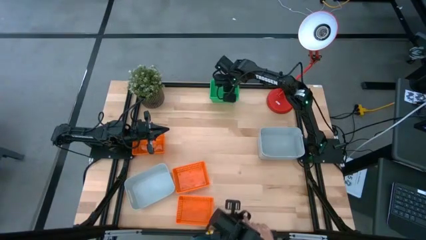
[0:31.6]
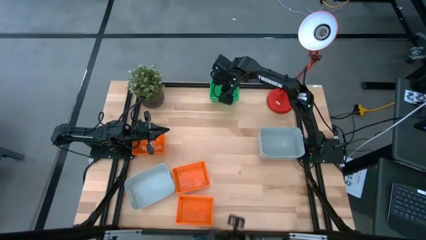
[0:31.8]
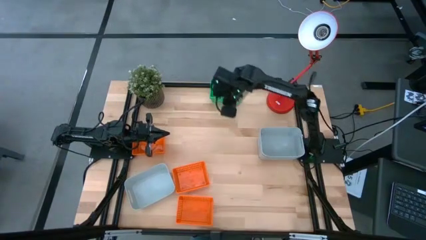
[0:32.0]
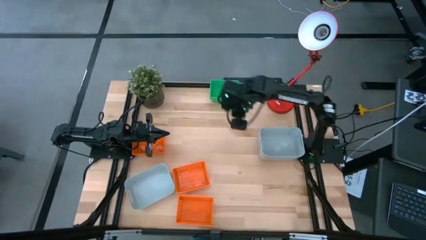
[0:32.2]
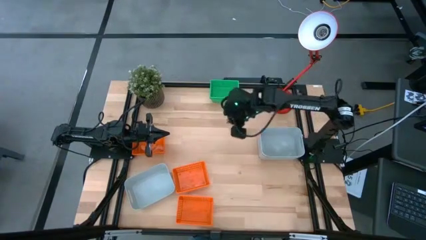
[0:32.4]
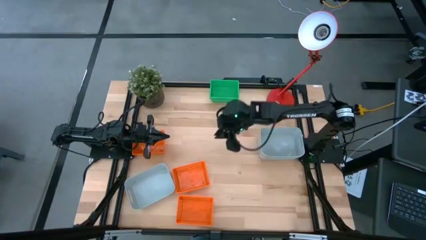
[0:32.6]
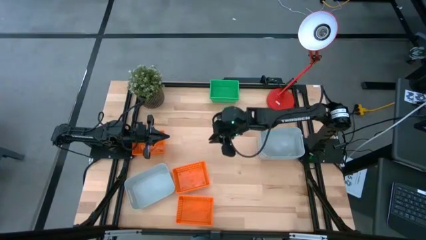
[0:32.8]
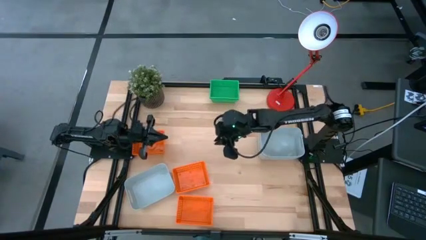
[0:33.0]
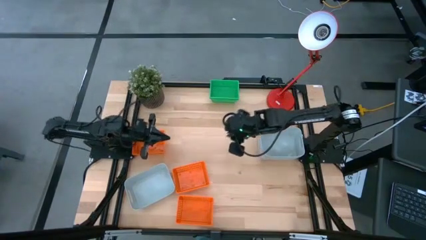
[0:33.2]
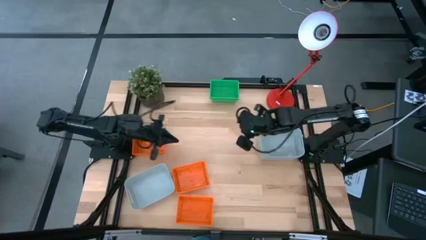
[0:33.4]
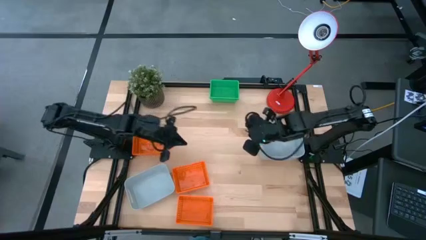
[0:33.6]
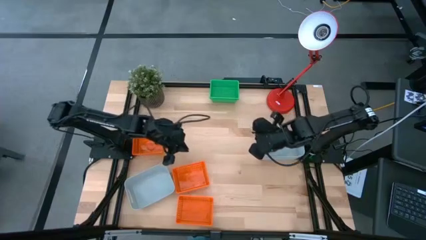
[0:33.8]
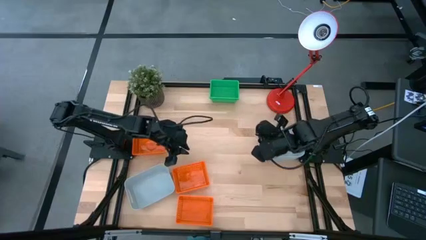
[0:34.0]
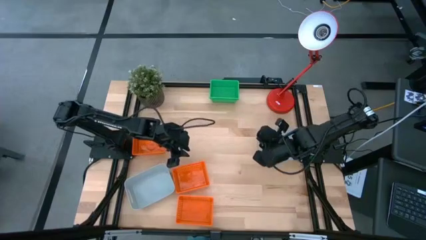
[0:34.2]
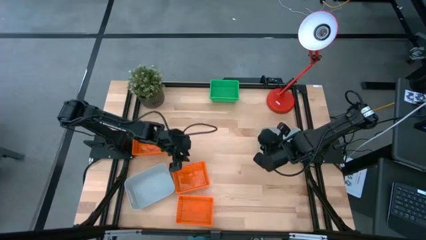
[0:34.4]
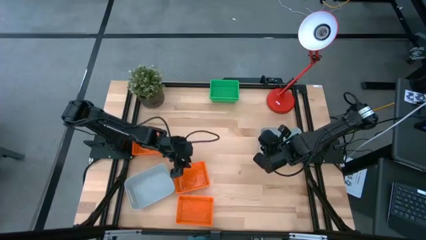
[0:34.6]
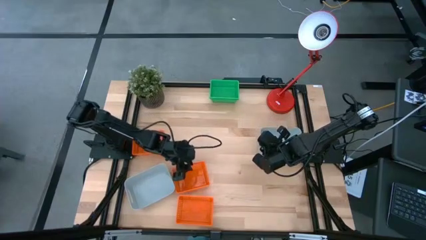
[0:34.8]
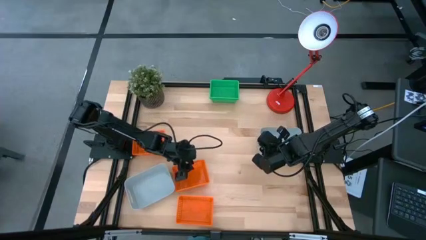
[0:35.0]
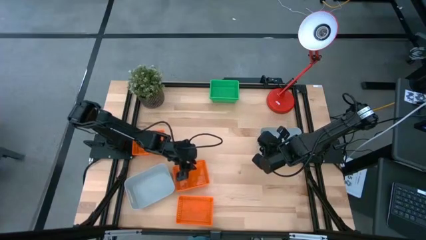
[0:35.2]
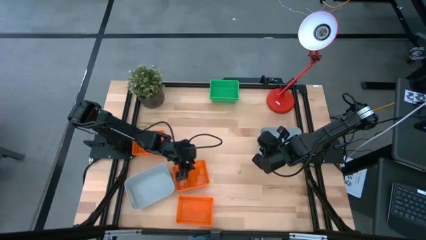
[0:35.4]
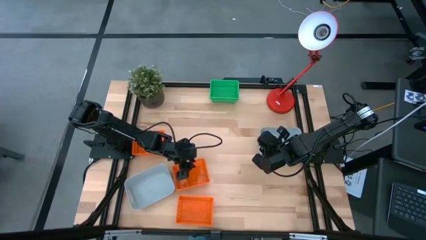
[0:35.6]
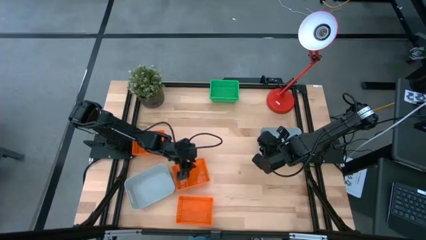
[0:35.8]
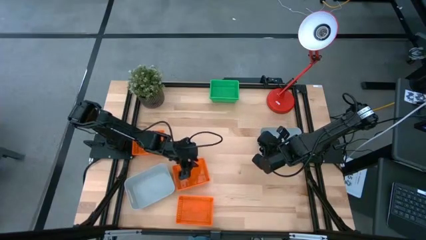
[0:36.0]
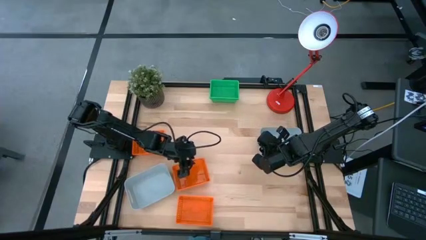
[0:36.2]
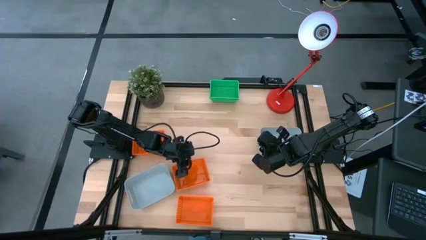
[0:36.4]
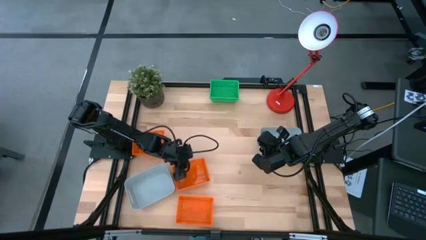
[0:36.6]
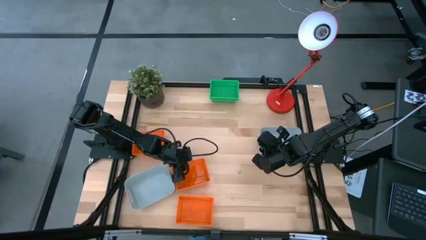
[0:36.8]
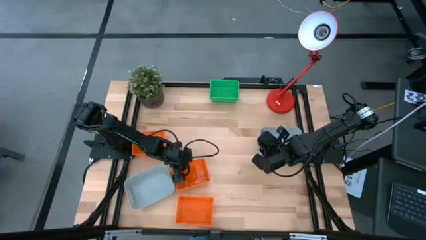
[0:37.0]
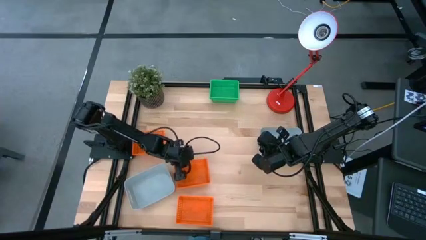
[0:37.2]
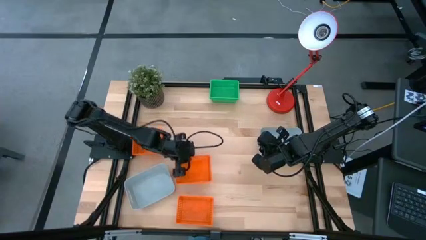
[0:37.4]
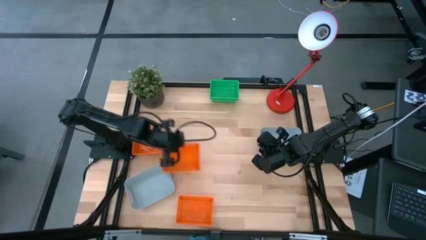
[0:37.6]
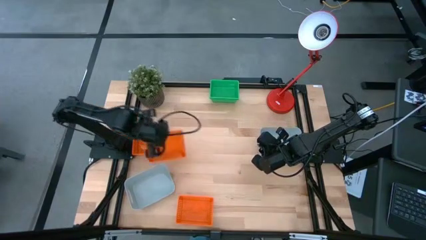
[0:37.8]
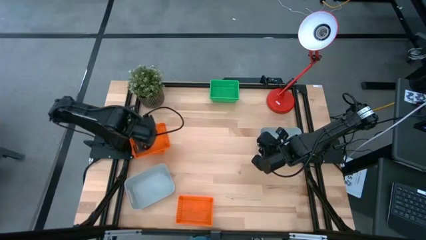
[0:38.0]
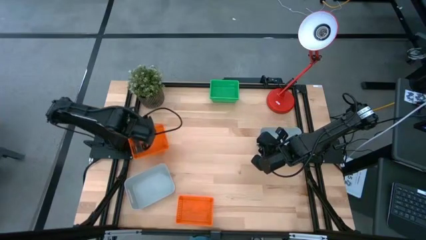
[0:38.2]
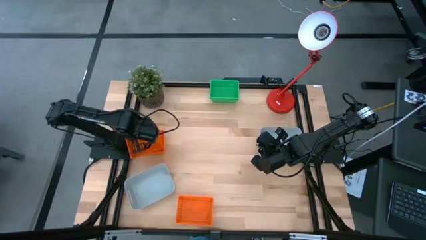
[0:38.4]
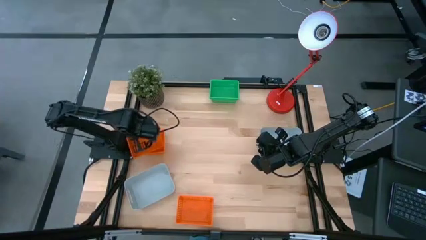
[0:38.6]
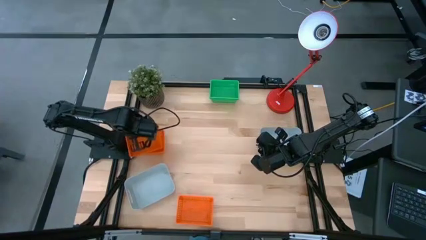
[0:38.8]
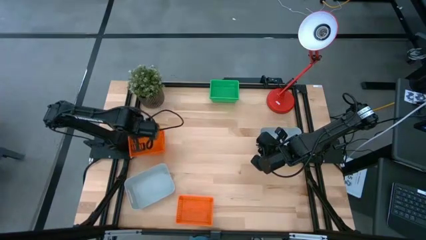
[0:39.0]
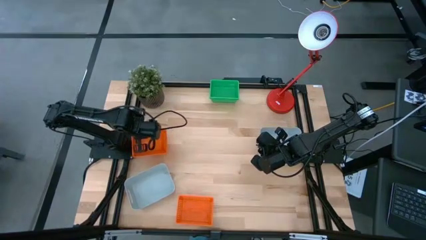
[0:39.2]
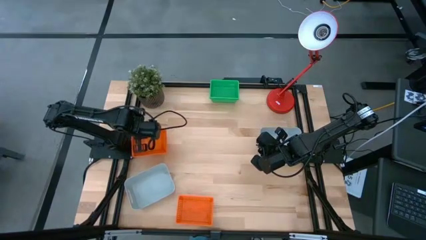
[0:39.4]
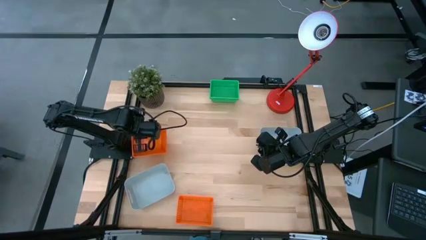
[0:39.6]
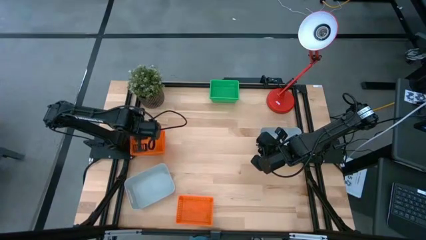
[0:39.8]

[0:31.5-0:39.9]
Stack the center orange bin onto the top orange bin

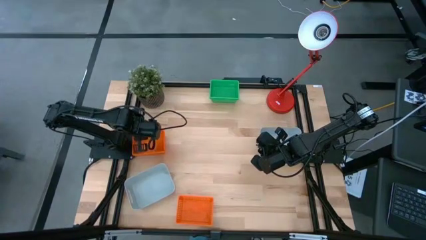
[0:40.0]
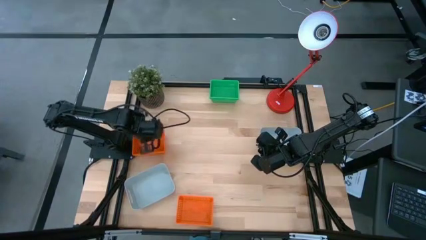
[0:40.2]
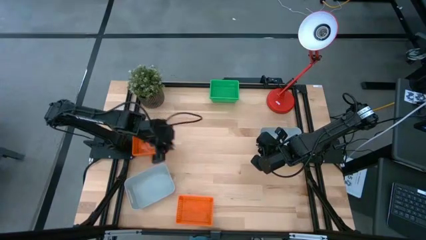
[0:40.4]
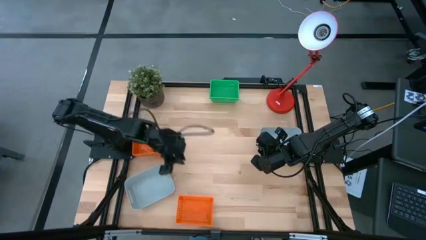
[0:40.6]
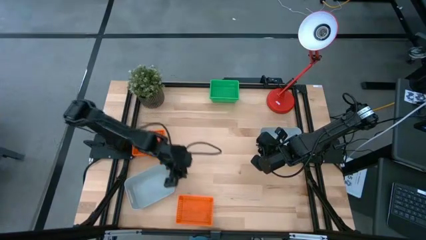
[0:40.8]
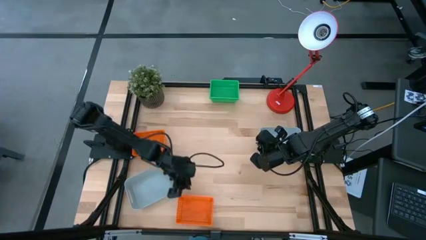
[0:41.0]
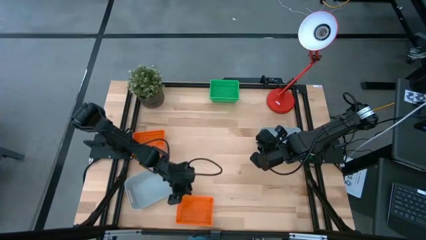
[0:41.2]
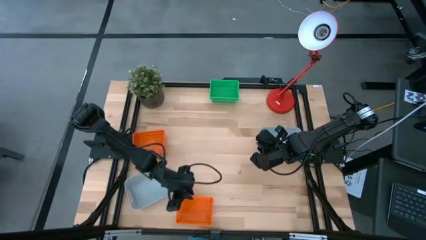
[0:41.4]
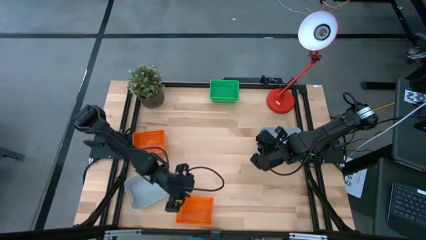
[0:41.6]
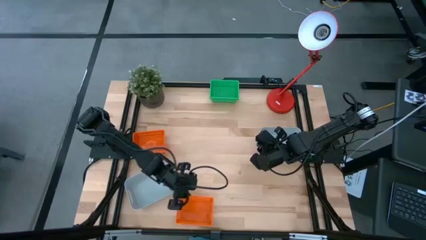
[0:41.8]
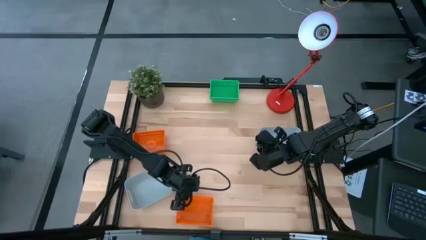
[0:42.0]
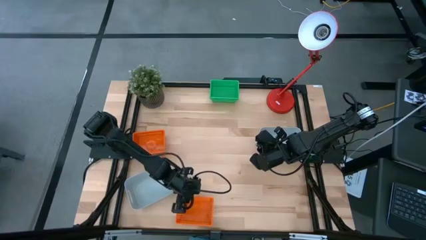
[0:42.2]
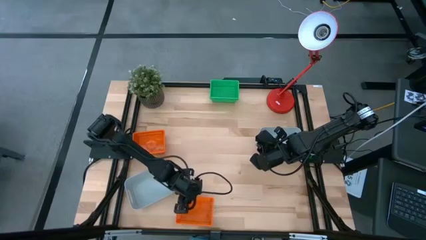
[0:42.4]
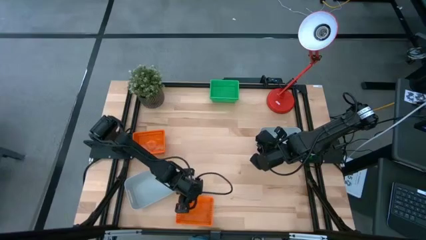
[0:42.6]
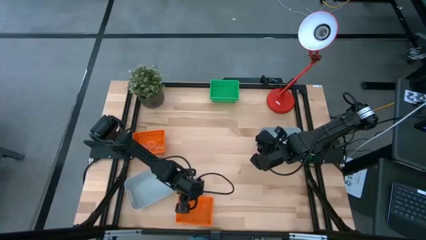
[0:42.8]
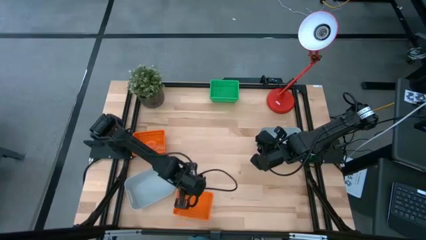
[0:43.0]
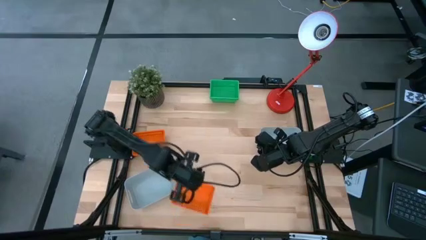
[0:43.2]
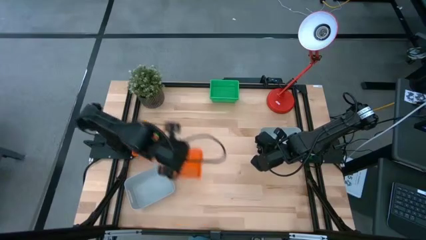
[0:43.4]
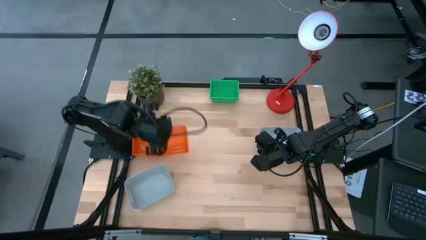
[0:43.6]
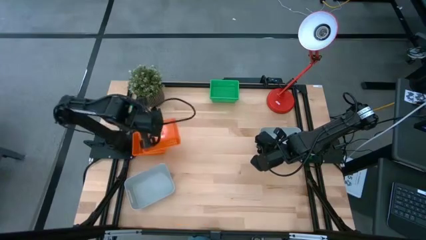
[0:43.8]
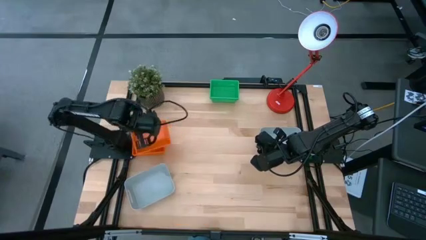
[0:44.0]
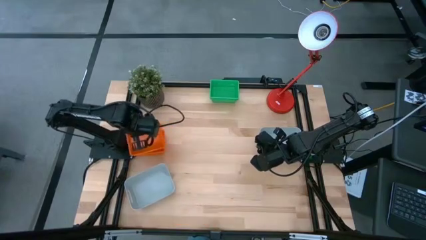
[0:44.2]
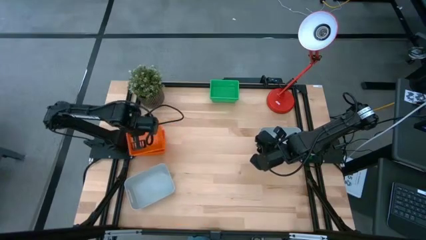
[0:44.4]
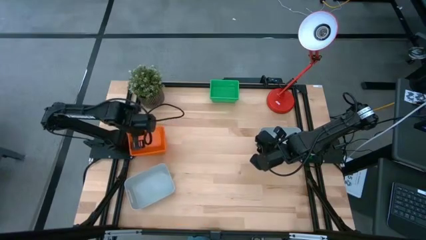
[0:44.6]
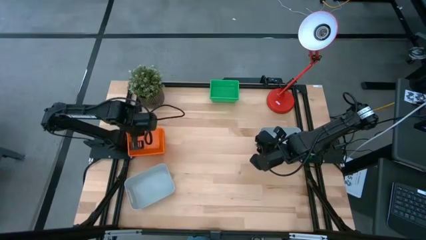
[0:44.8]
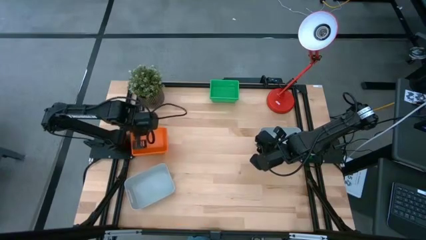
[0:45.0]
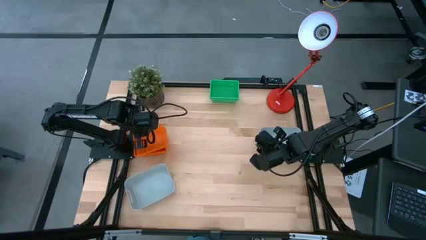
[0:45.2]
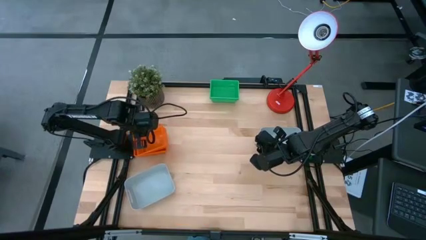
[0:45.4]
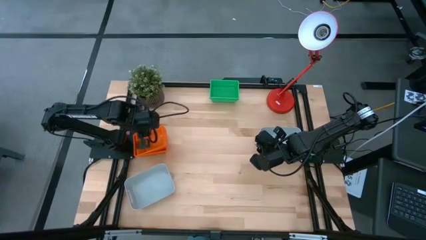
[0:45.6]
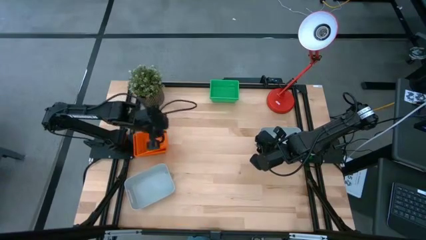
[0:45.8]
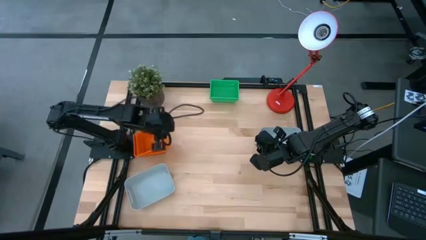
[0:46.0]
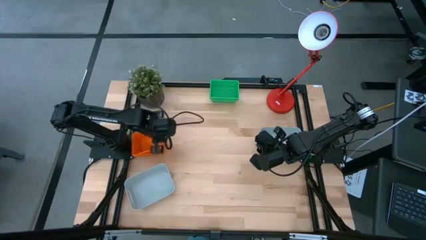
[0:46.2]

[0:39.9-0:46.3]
Stack the bottom orange bin onto the other orange bin
